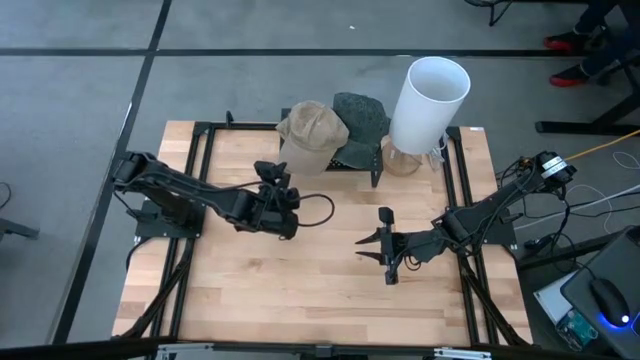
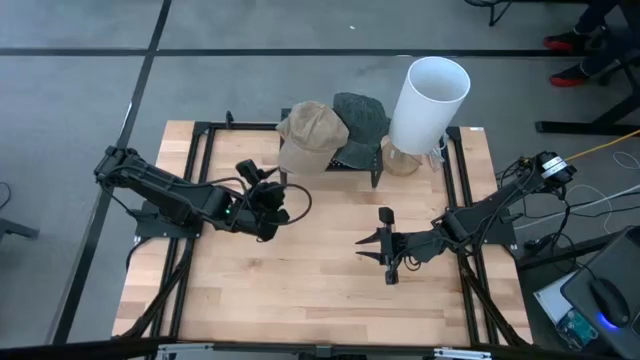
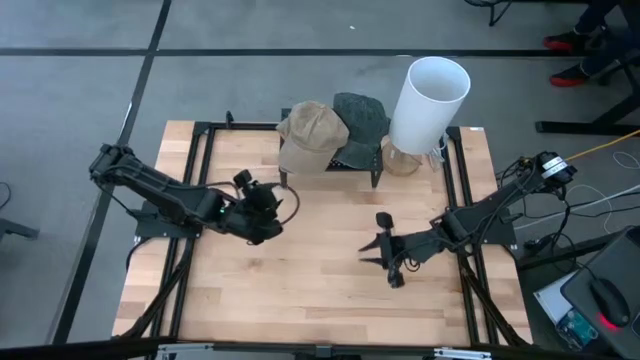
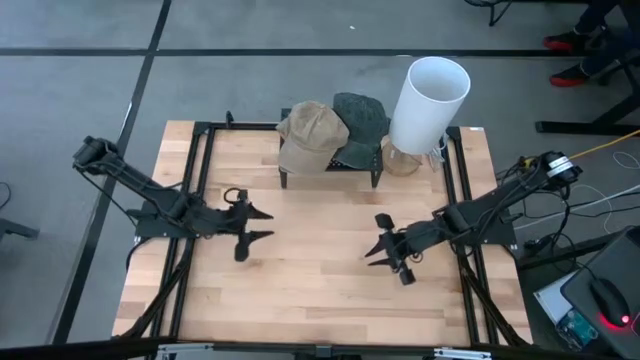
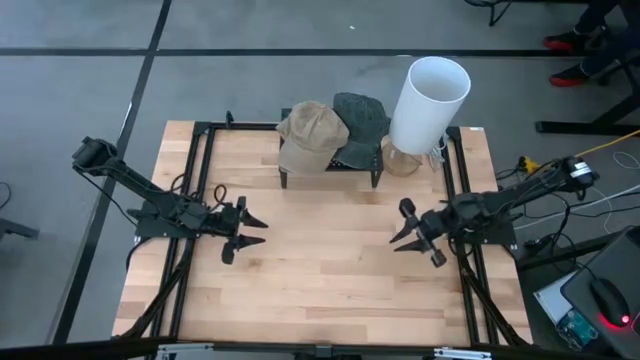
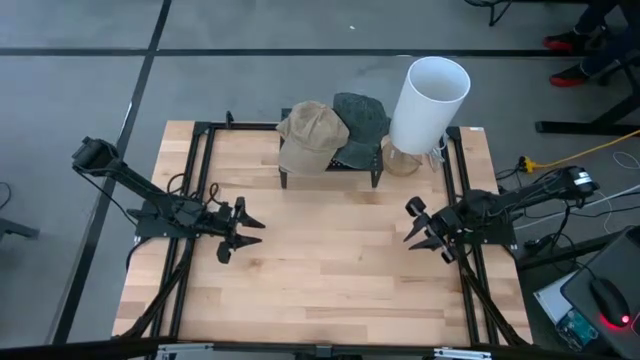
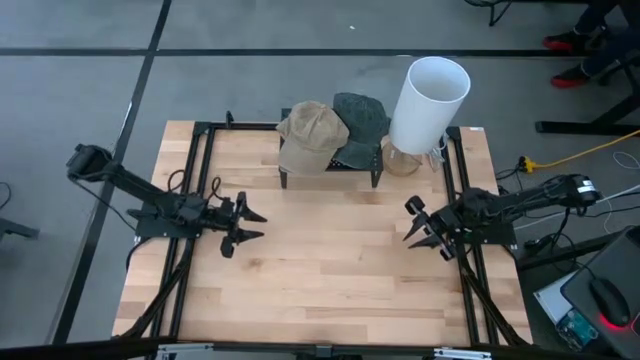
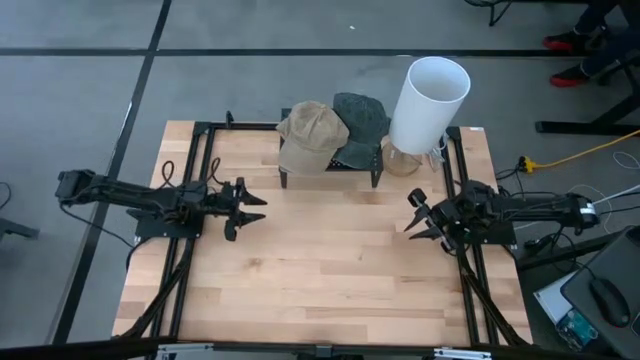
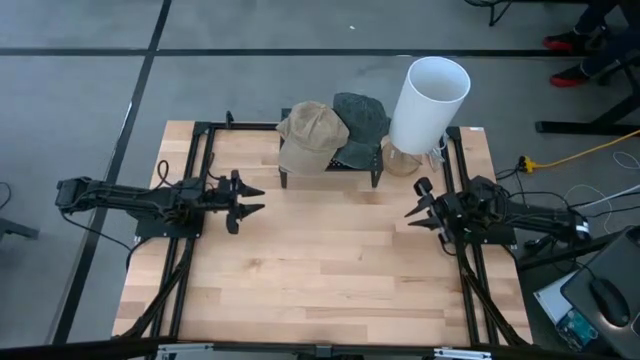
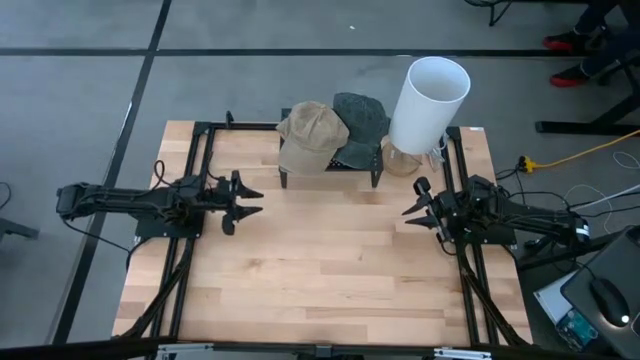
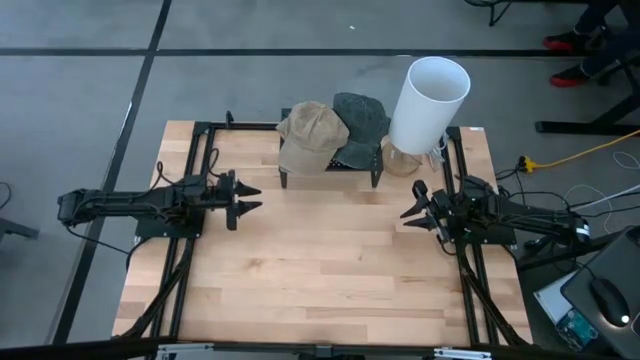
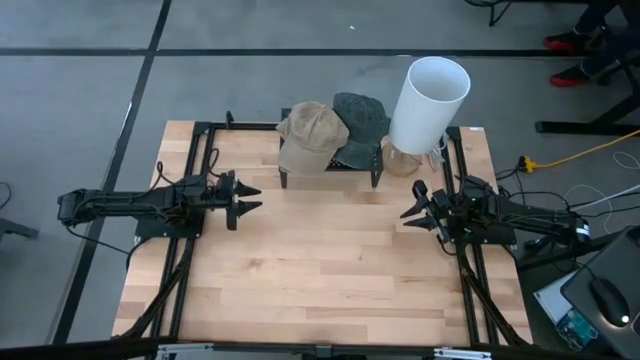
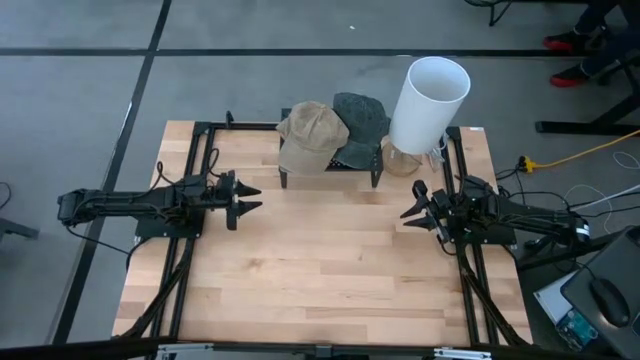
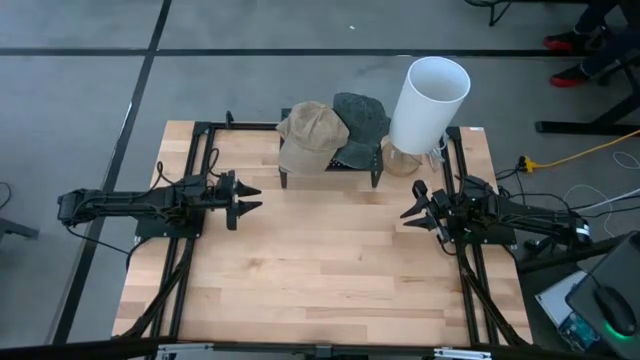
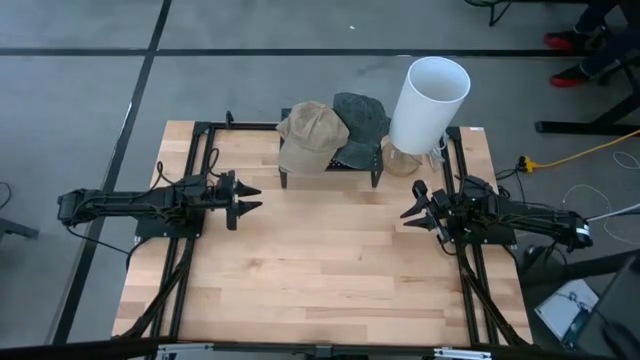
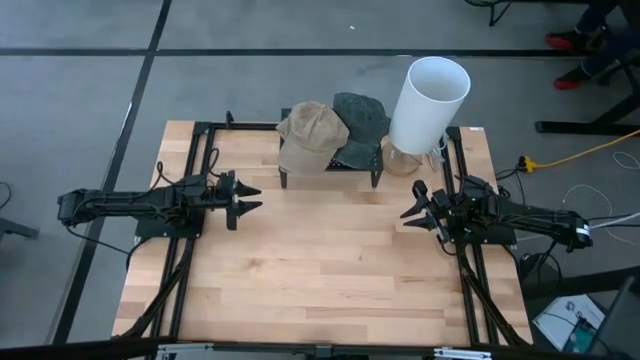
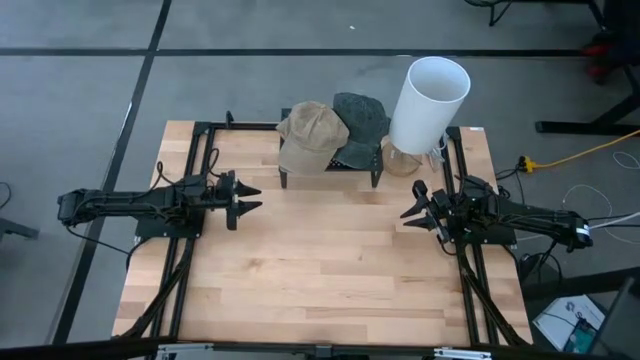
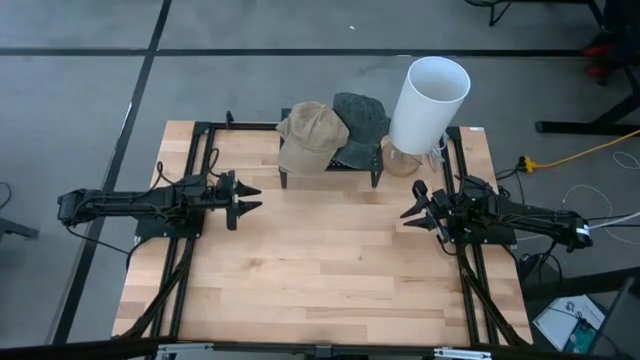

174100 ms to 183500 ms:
Task: Pick & Place hat
Return to Home Position

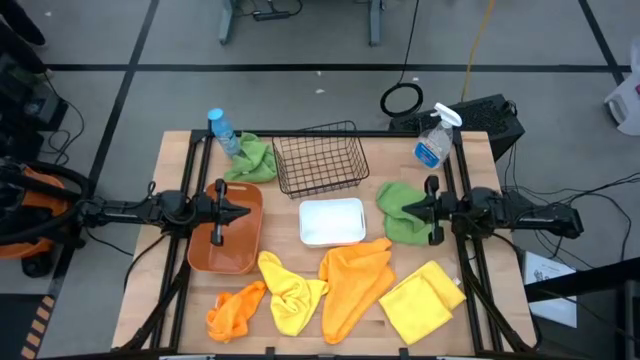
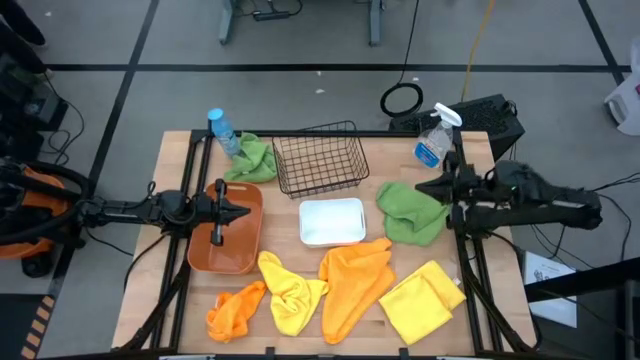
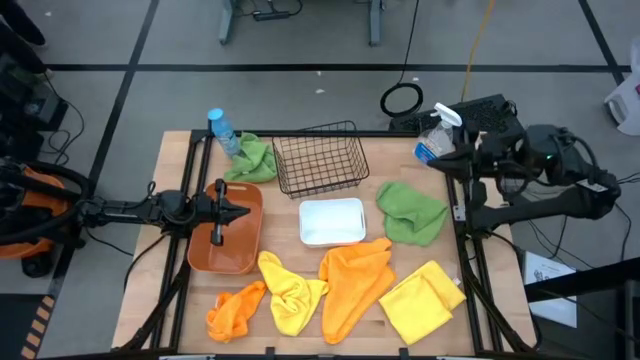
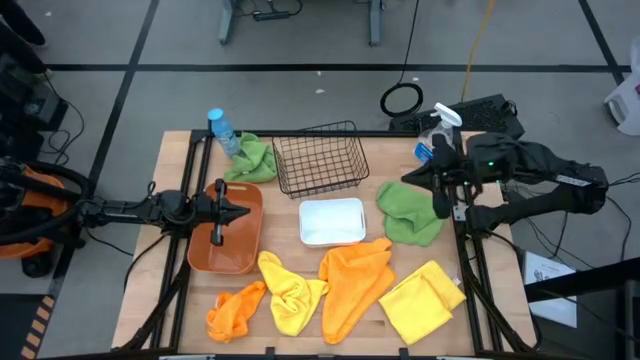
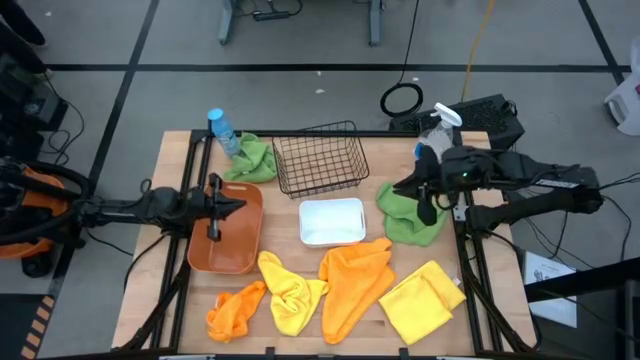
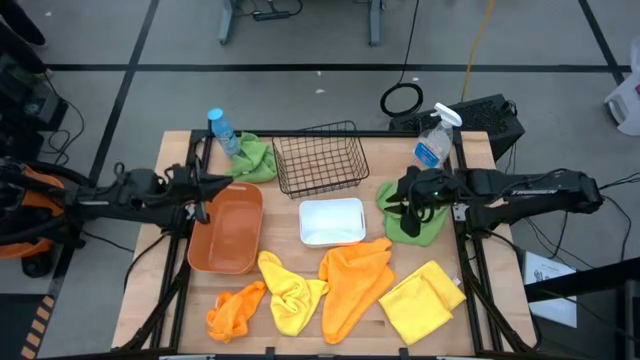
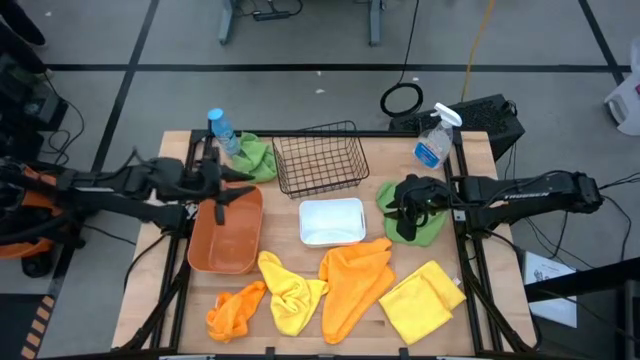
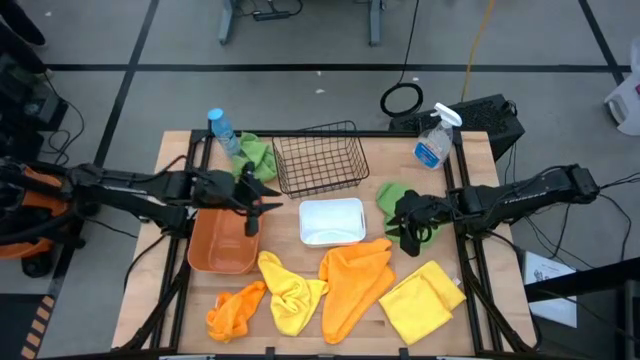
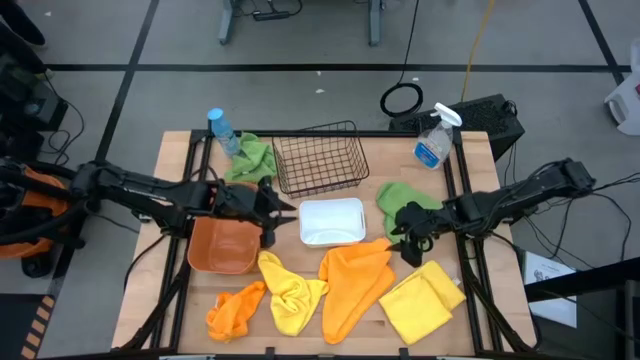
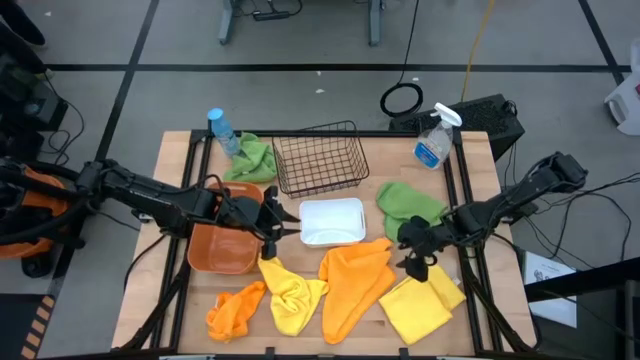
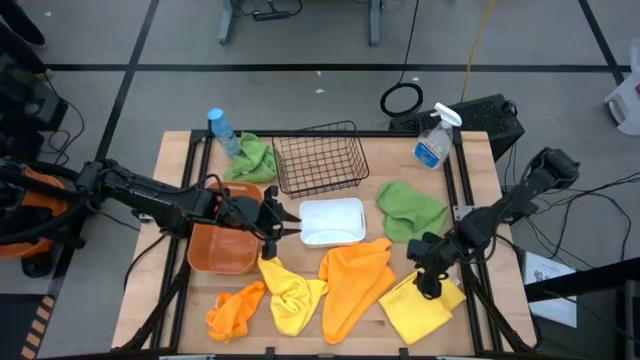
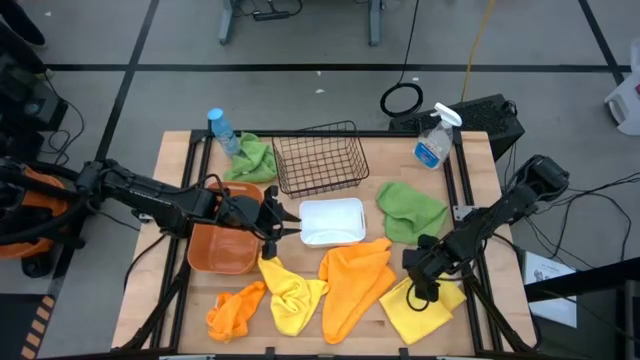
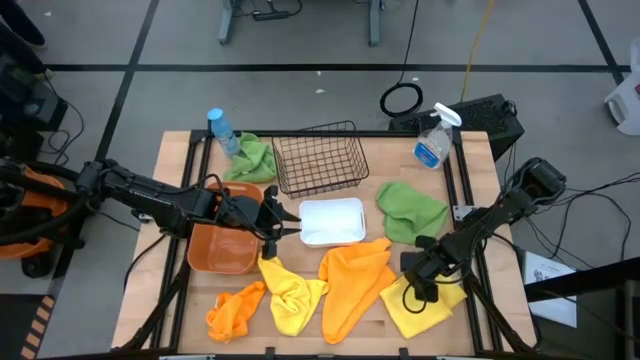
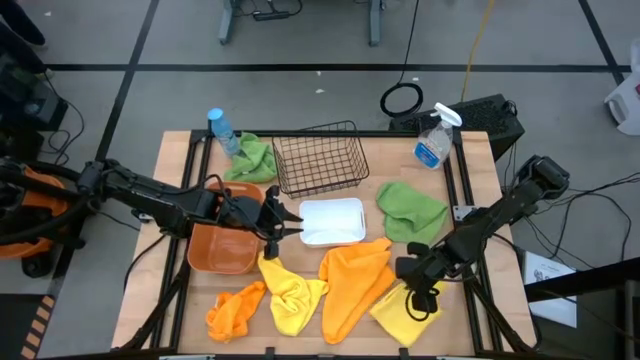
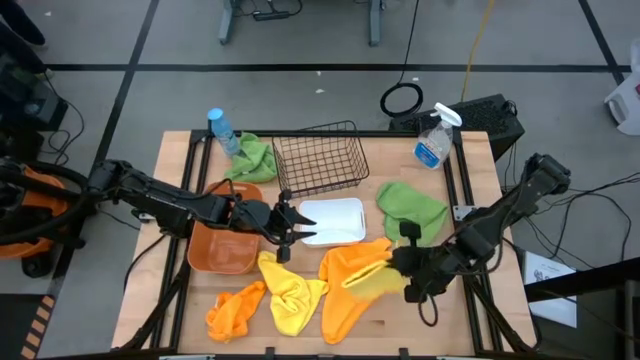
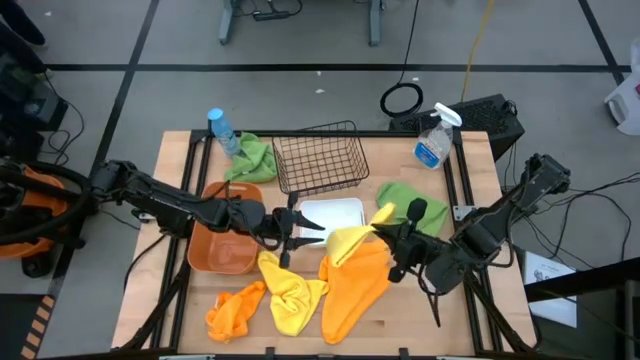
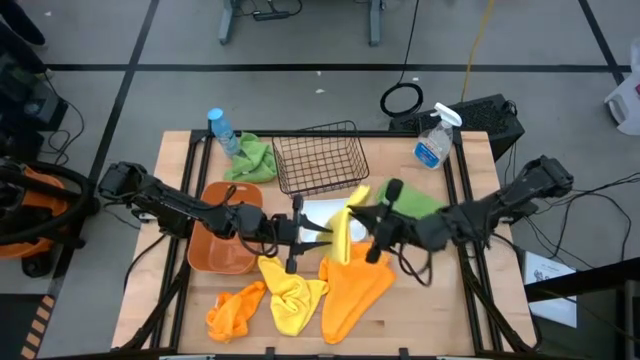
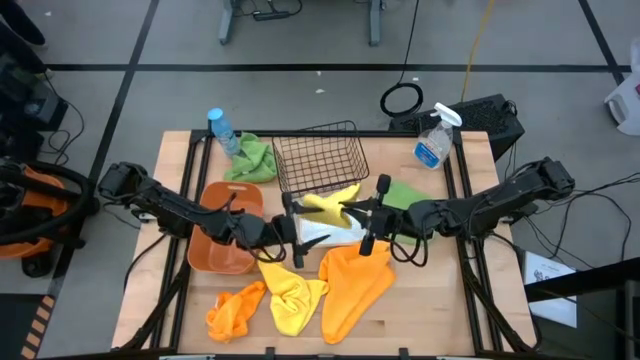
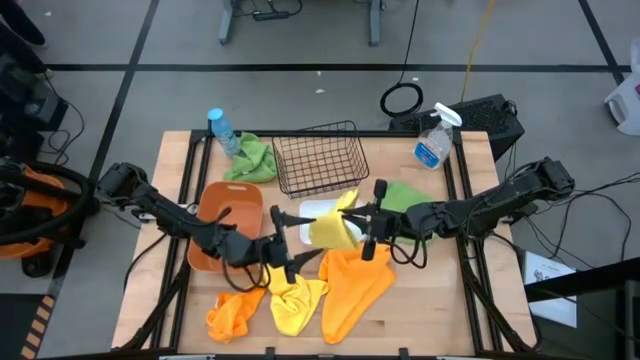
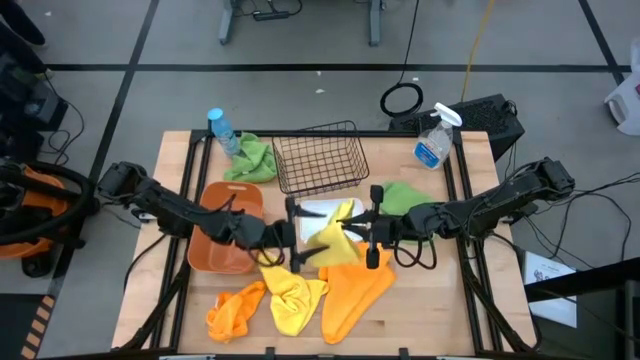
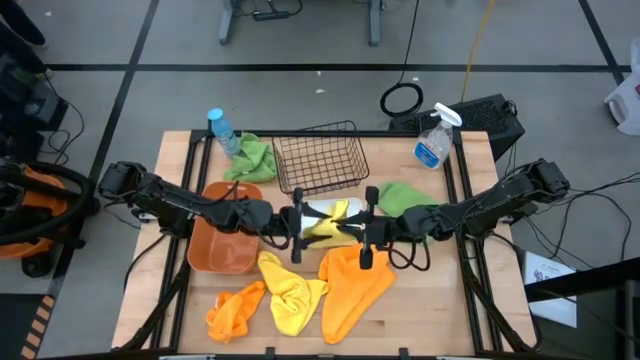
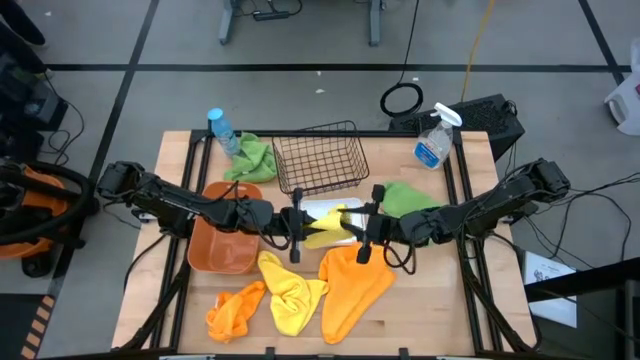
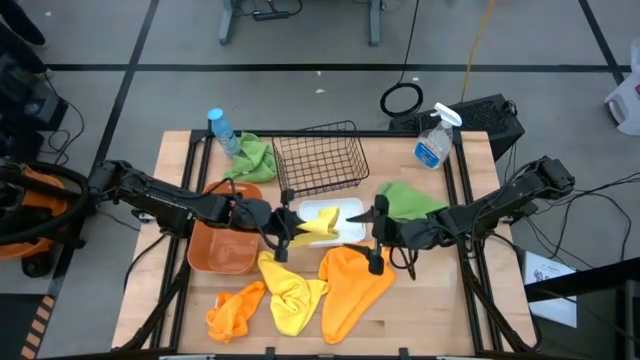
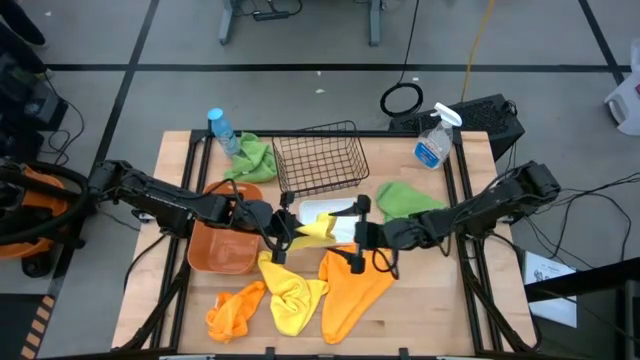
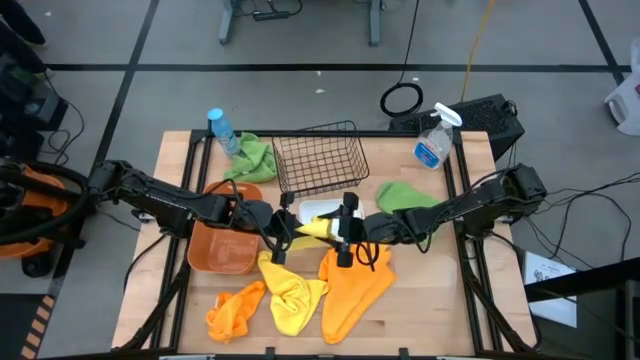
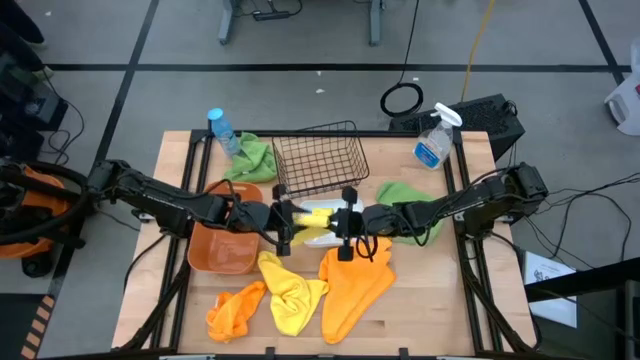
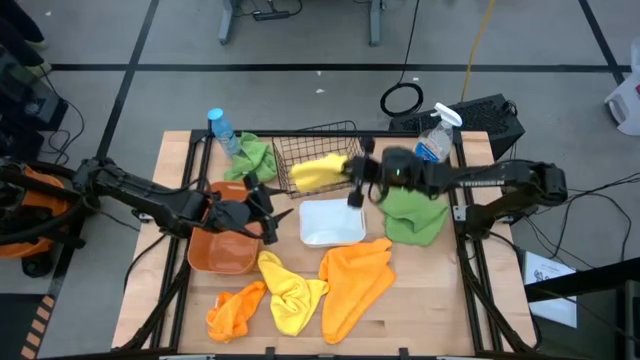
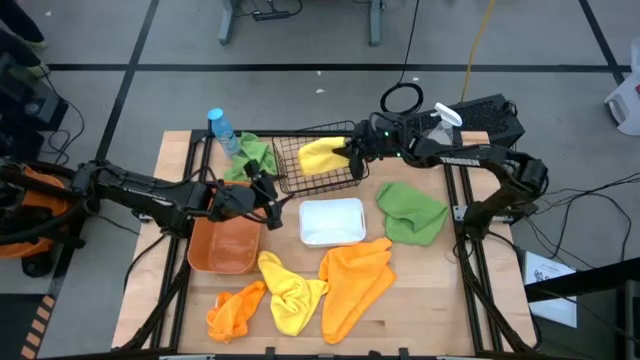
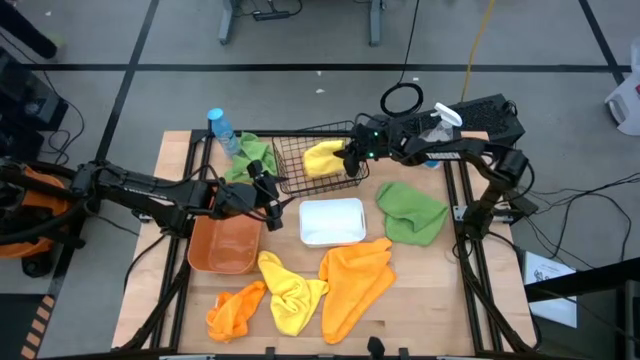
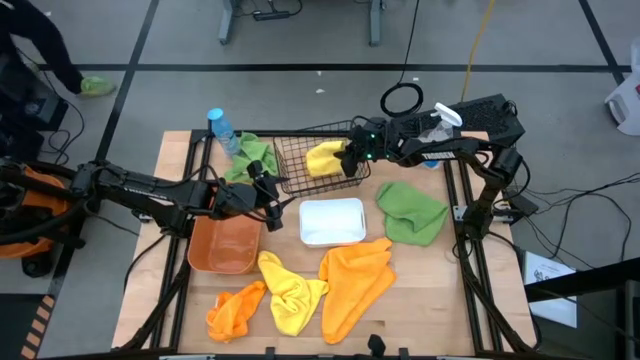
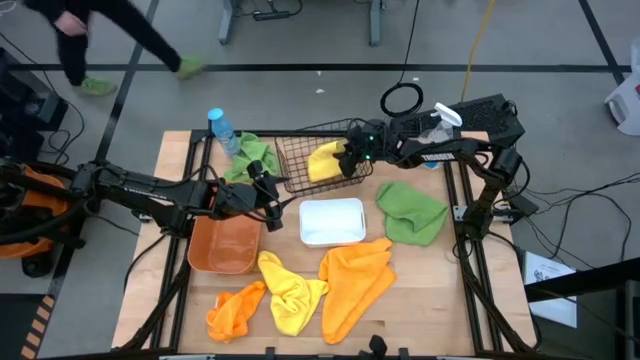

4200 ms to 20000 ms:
Task: Sort microfiber towel by color & place in baskets
Put the right yellow towel into the black wire basket
